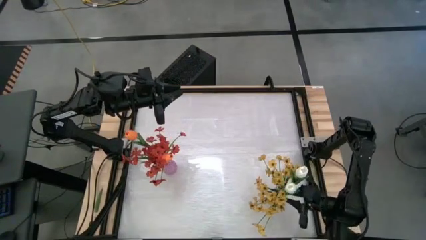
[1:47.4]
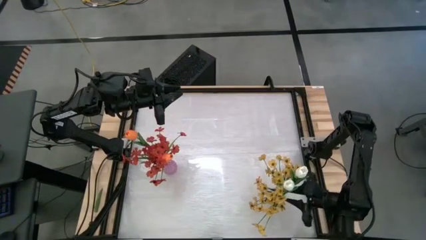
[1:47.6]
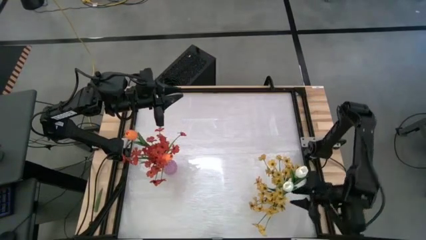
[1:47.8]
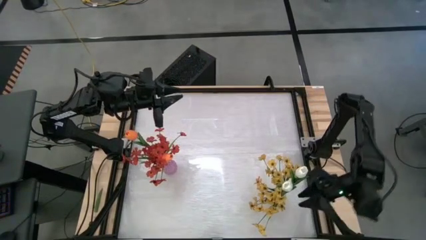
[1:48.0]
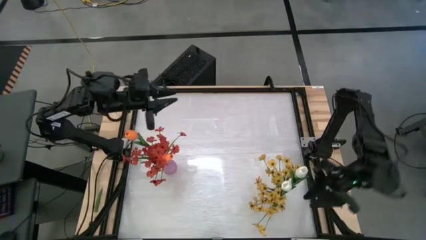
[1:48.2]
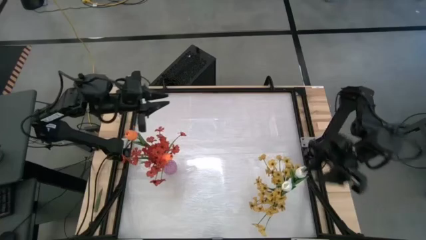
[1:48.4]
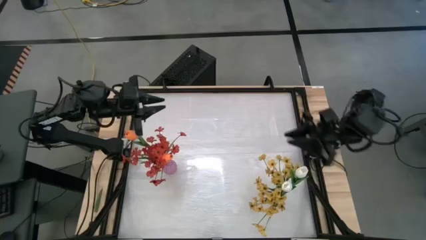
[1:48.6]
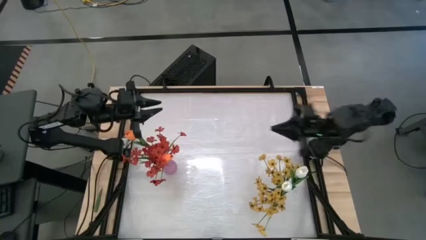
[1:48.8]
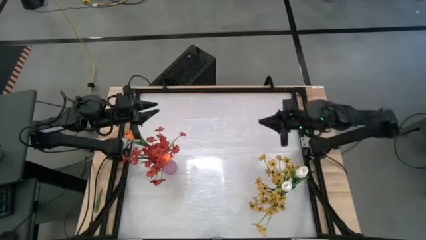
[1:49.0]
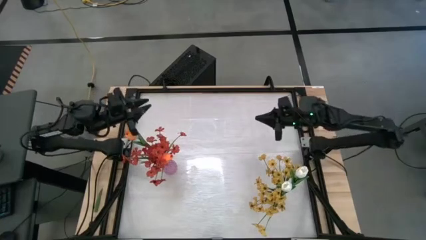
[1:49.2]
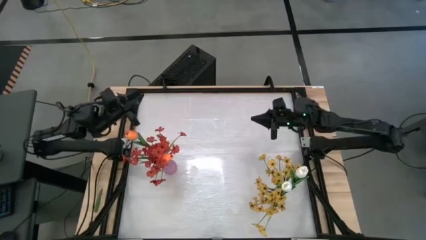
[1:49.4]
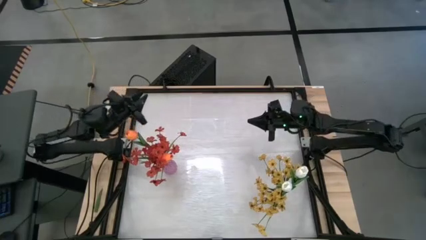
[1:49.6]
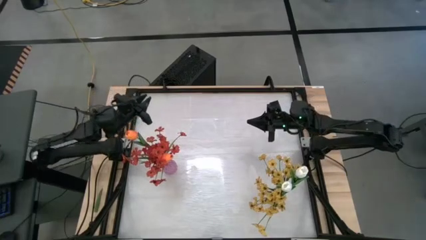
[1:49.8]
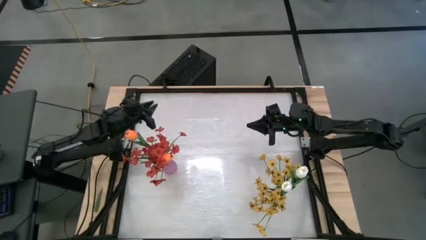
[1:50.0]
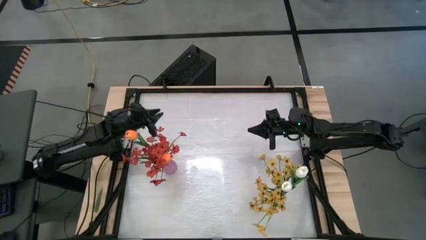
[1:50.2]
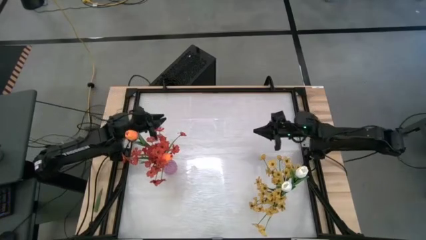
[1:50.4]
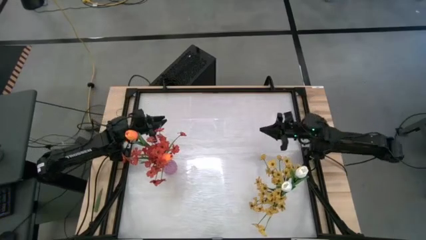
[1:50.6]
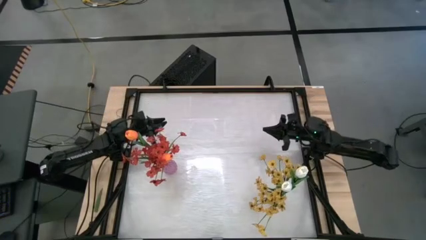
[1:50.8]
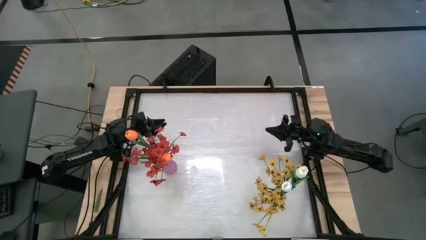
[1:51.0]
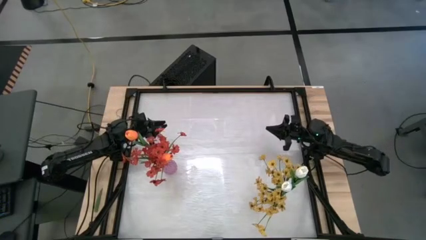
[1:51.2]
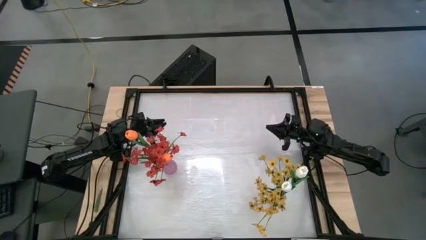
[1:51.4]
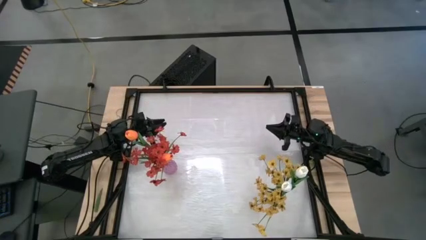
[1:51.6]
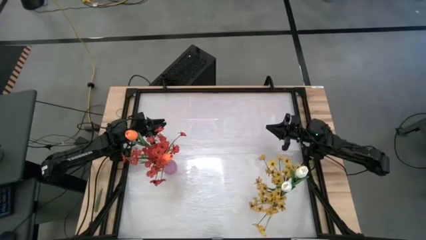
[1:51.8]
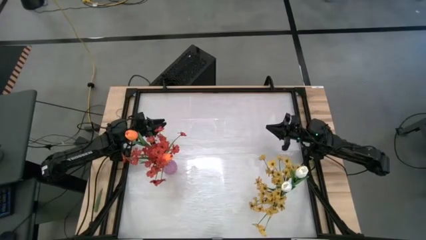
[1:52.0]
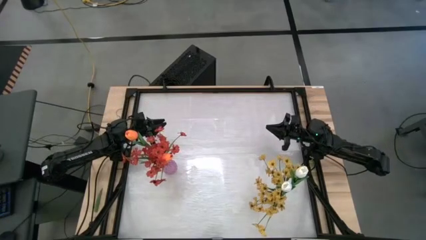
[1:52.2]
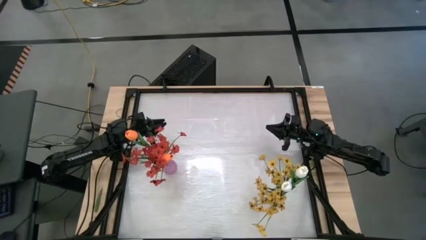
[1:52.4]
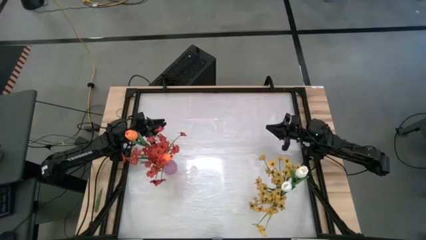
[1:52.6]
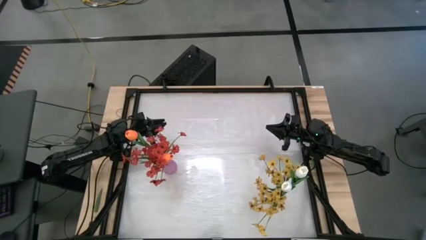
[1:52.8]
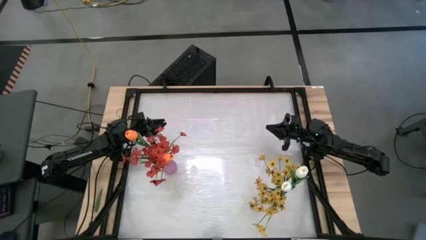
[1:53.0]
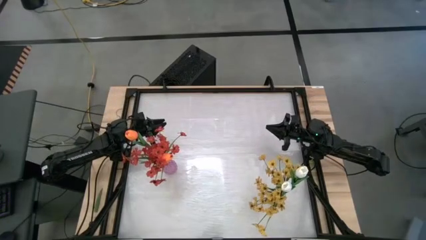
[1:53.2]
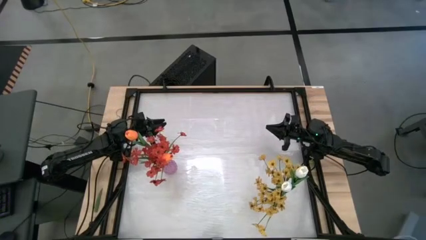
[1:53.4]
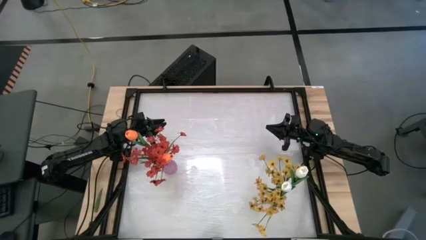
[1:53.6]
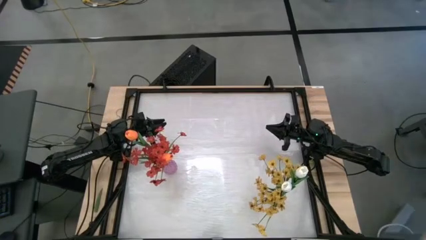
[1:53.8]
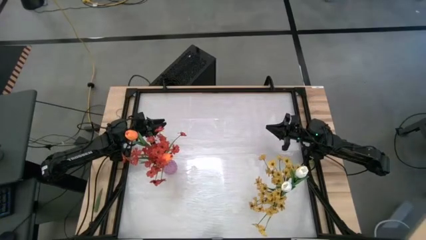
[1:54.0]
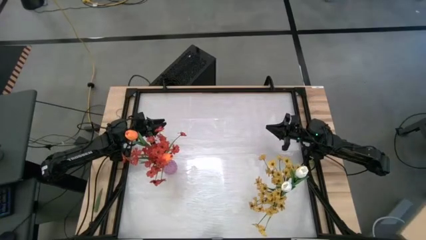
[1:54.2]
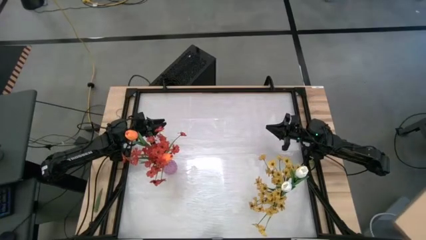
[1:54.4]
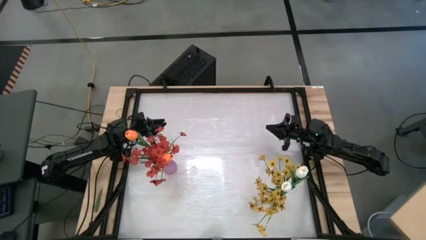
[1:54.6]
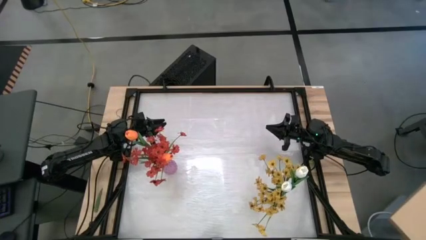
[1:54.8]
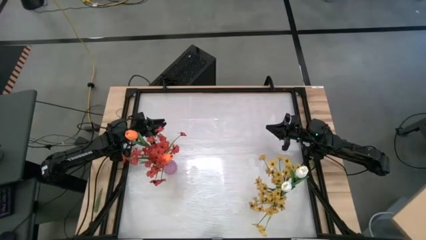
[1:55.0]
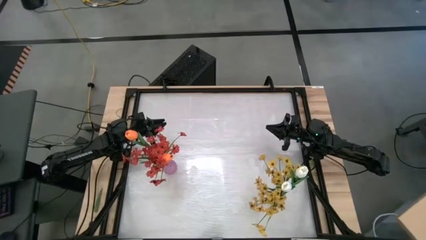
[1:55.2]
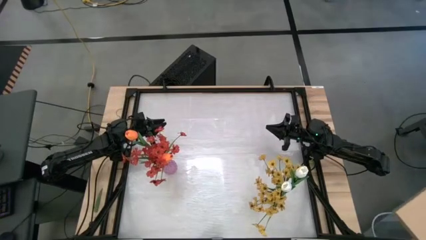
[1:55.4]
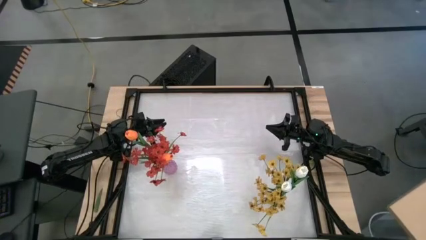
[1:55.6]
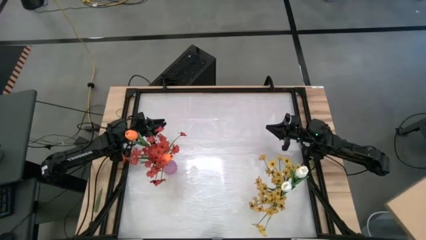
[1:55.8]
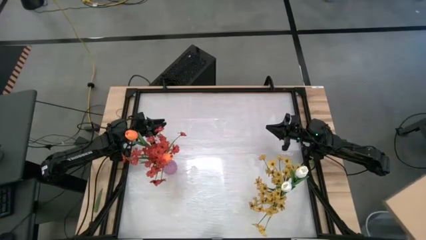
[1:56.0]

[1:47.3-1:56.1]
Task: Sort flowers into vase by color
Return to Home Position

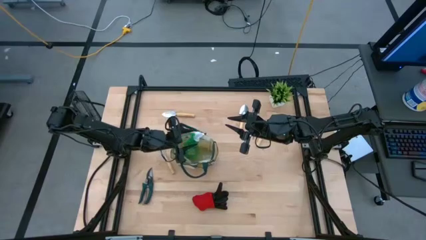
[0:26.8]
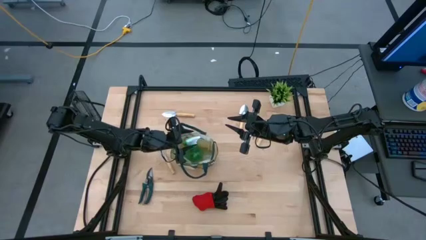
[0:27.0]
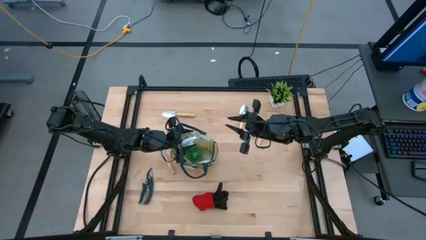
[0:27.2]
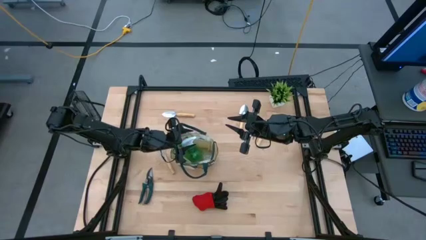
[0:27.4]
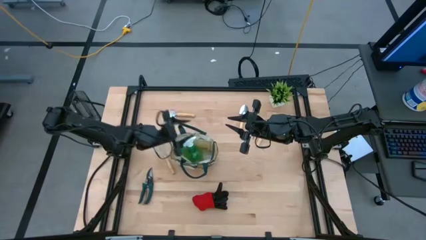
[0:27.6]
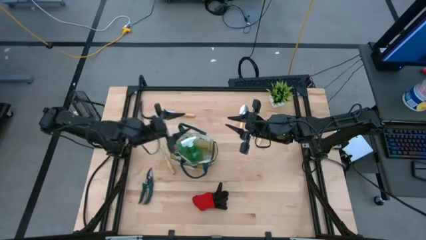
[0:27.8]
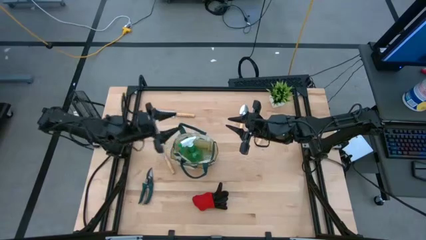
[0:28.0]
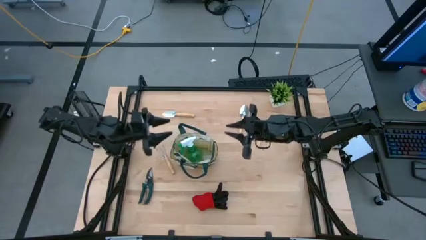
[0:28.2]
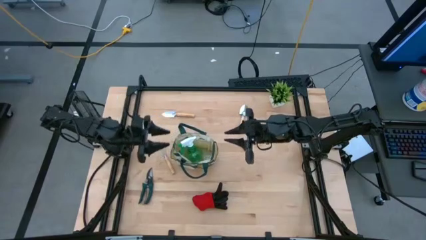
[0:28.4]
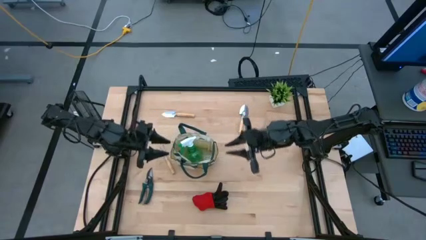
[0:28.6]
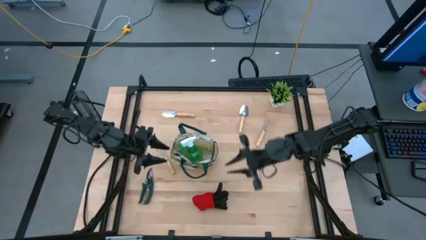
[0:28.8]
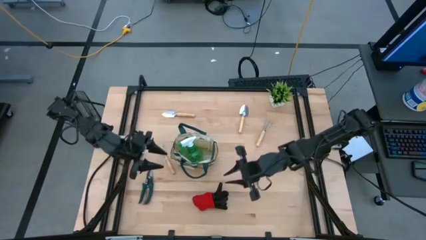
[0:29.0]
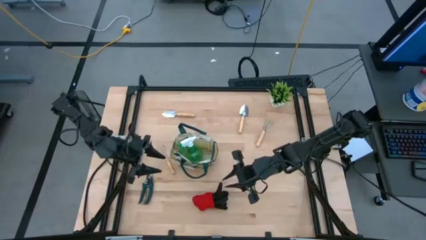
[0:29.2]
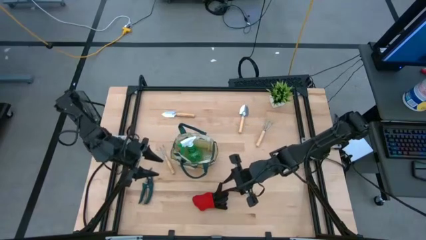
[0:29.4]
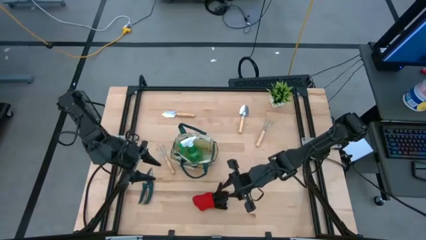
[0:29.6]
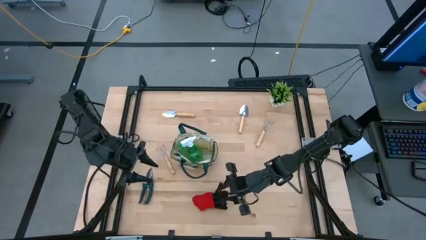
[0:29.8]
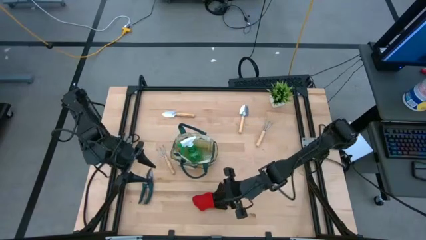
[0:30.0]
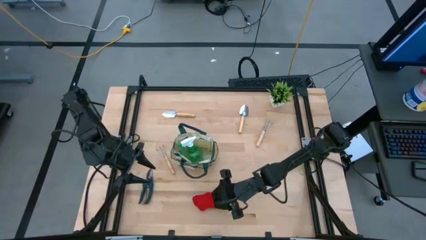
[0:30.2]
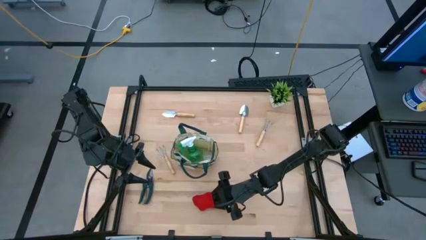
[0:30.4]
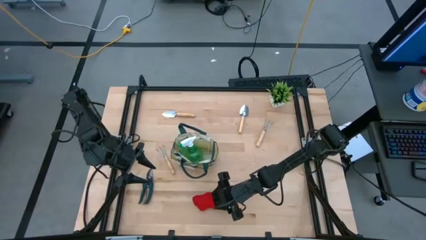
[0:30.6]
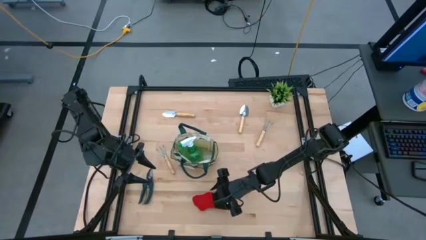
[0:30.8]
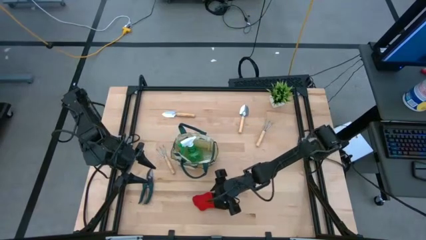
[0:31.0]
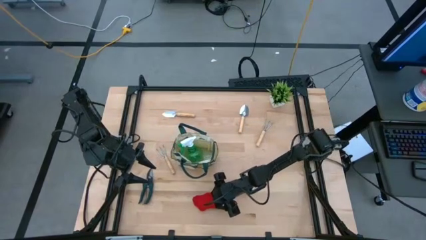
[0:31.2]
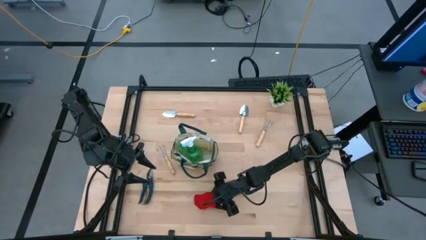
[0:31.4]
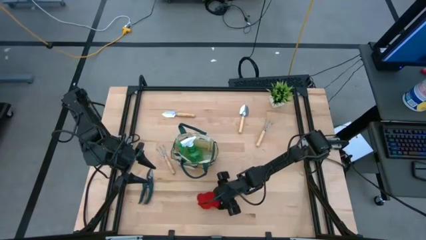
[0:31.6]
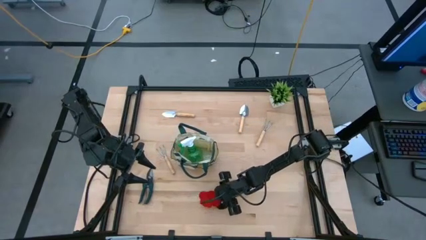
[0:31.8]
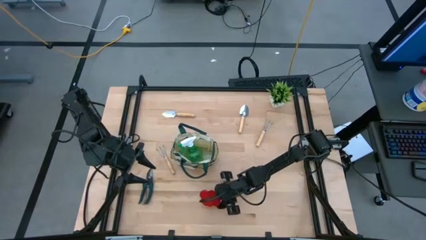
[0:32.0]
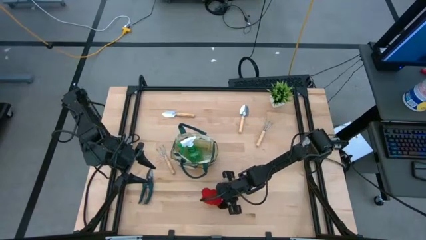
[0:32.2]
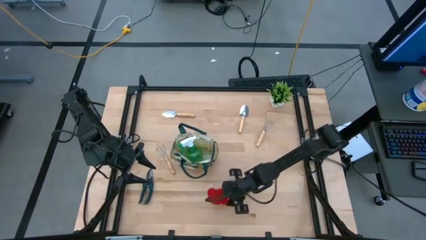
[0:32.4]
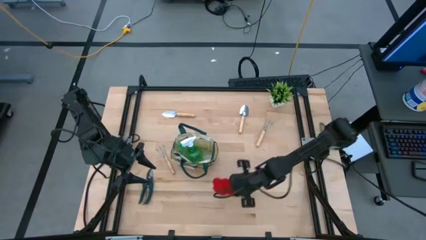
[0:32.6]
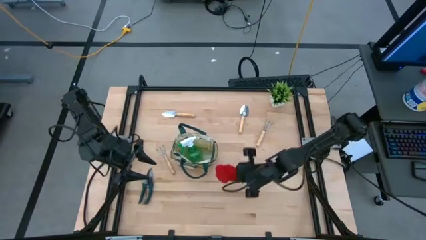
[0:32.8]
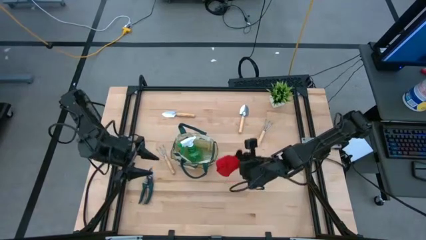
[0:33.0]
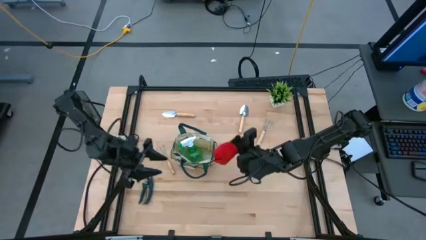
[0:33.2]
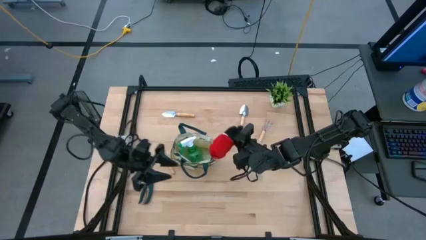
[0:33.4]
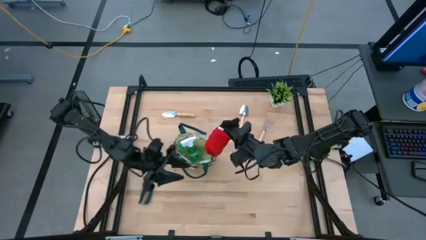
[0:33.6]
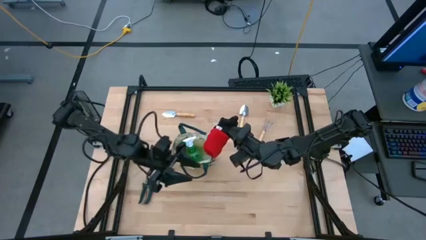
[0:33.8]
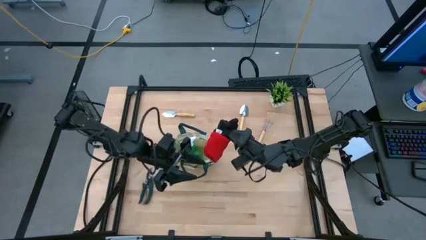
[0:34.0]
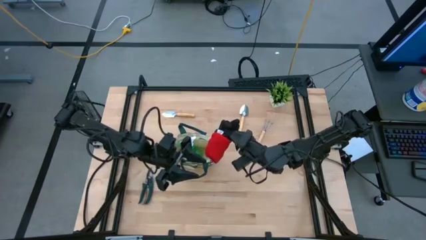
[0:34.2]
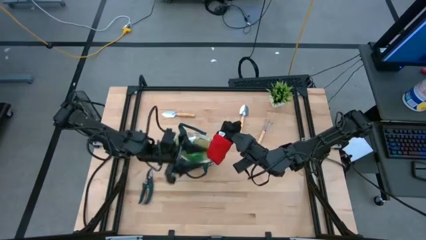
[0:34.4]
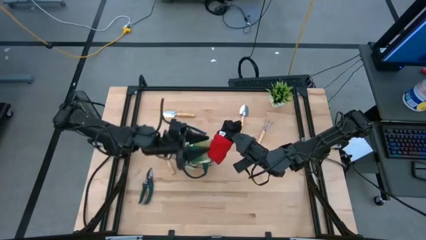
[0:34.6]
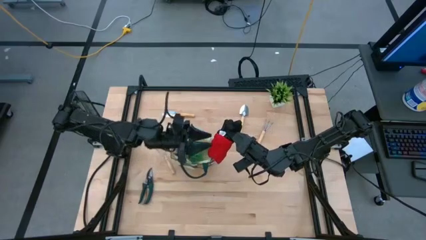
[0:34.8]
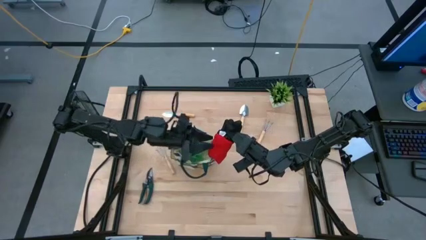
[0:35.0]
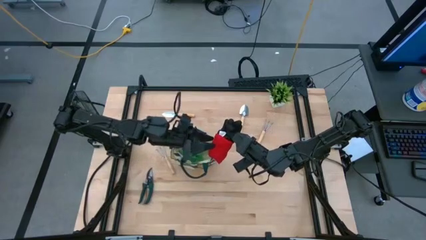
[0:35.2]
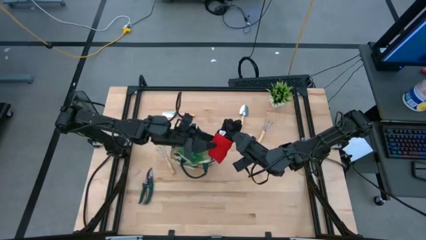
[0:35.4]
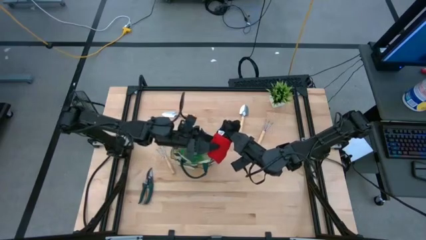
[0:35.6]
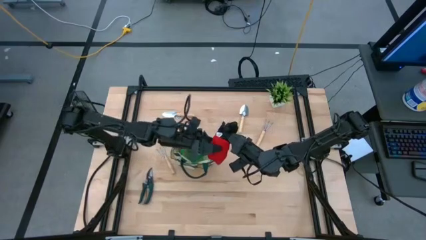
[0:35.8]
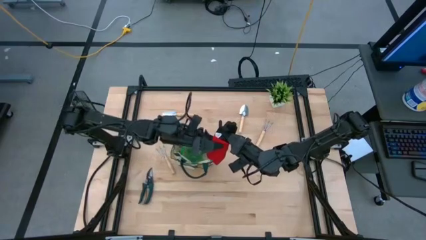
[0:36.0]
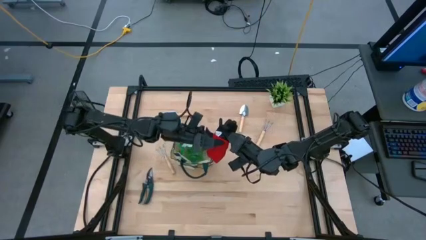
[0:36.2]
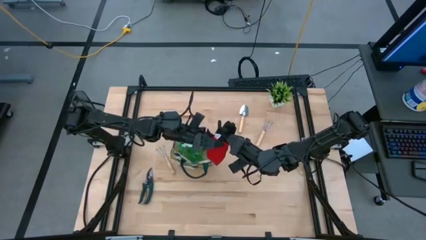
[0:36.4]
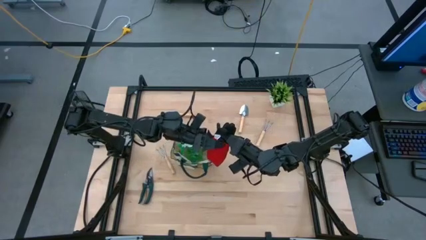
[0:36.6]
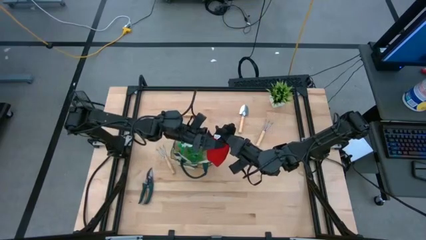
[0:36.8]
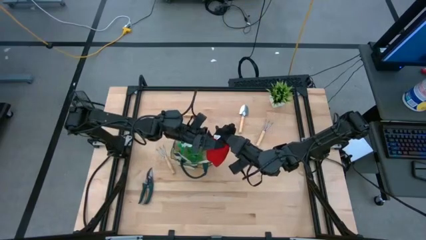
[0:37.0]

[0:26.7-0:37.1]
Task: Pick & Place Garden tools in Gardening bag
Put the red gloves into the brown gardening bag
